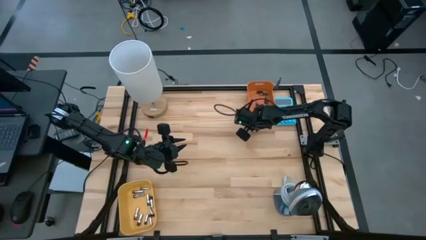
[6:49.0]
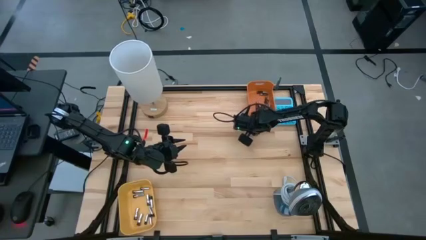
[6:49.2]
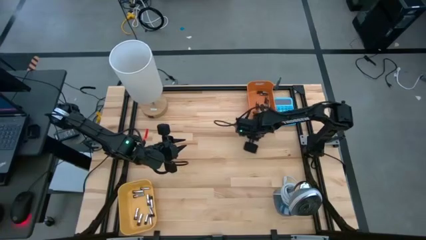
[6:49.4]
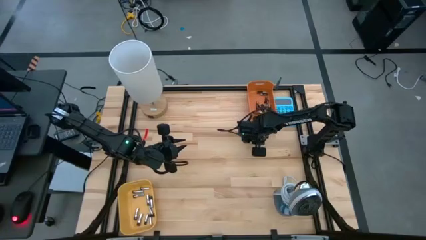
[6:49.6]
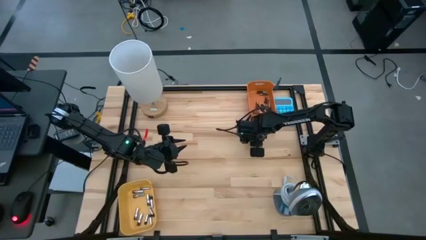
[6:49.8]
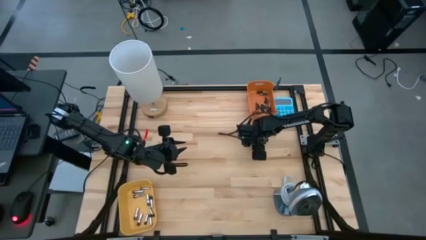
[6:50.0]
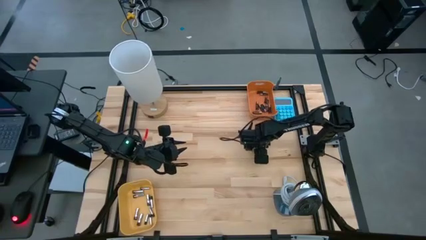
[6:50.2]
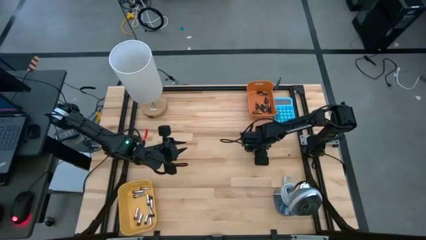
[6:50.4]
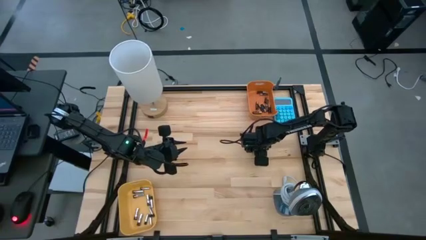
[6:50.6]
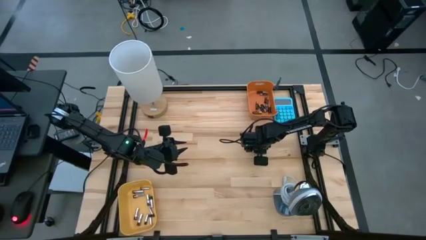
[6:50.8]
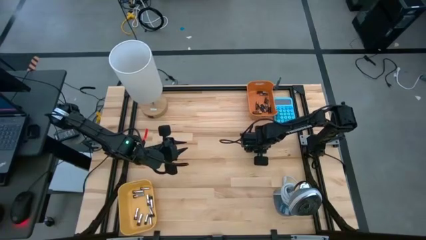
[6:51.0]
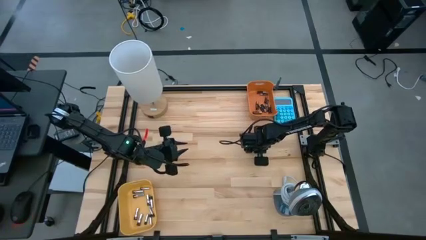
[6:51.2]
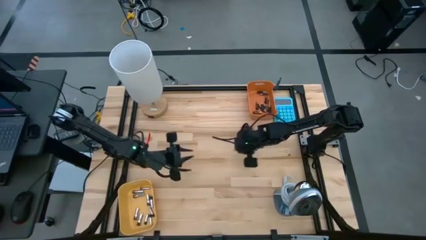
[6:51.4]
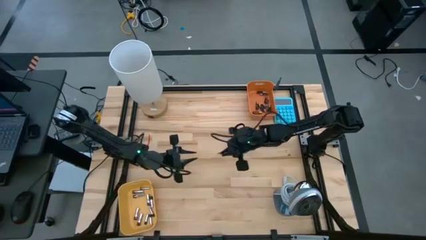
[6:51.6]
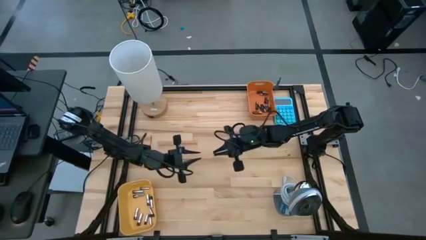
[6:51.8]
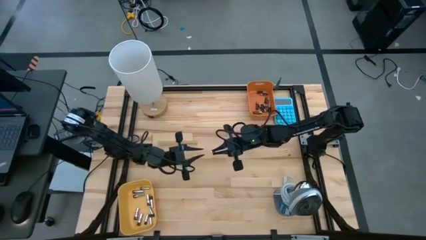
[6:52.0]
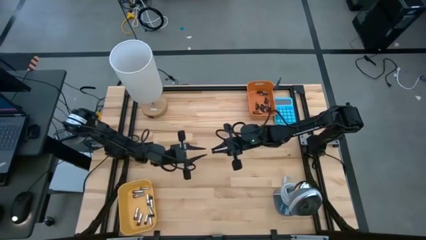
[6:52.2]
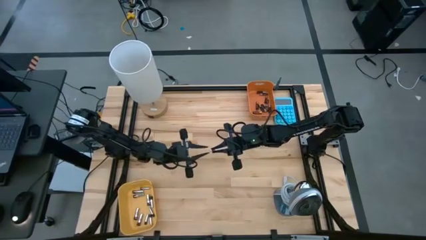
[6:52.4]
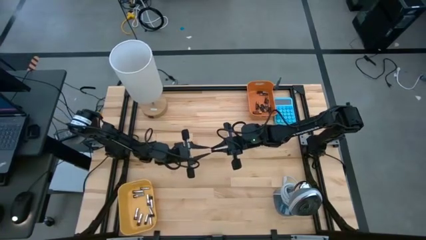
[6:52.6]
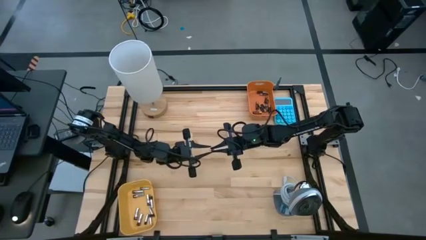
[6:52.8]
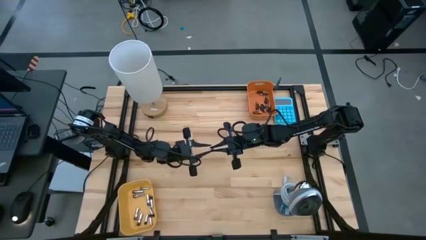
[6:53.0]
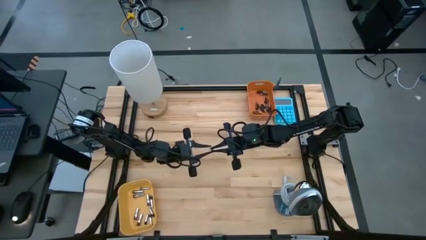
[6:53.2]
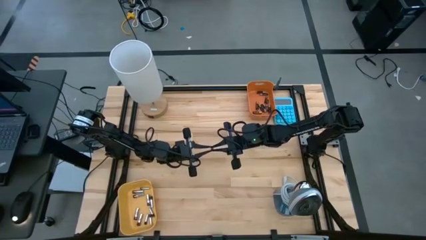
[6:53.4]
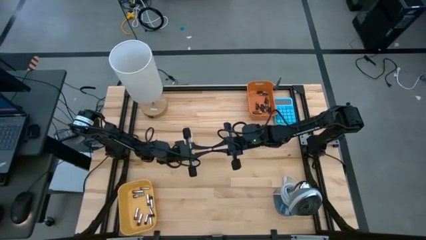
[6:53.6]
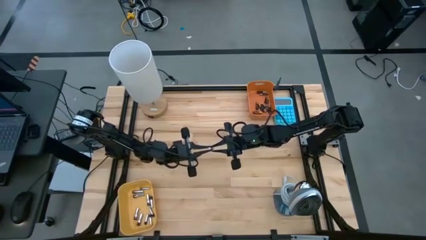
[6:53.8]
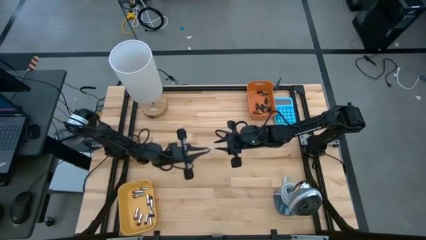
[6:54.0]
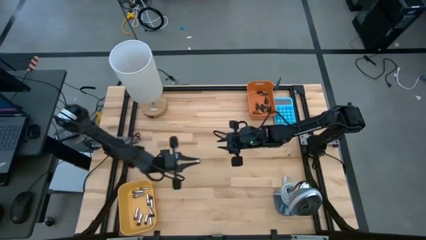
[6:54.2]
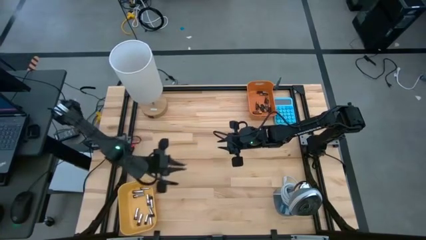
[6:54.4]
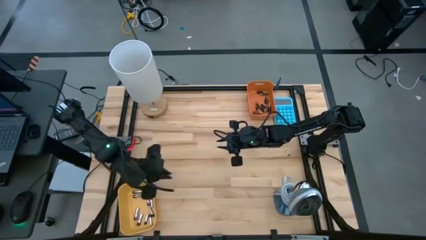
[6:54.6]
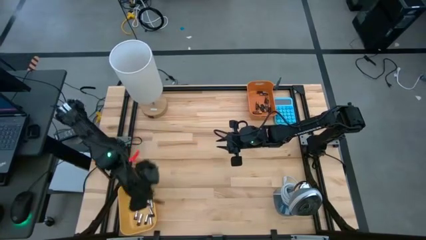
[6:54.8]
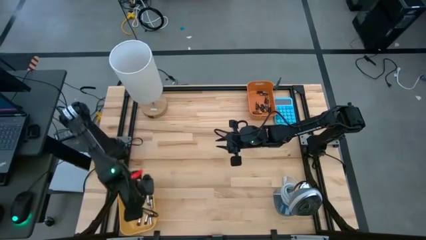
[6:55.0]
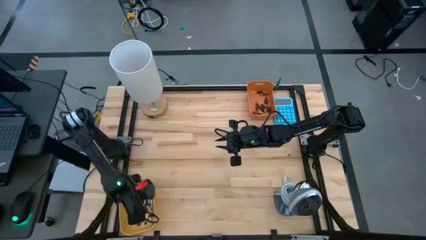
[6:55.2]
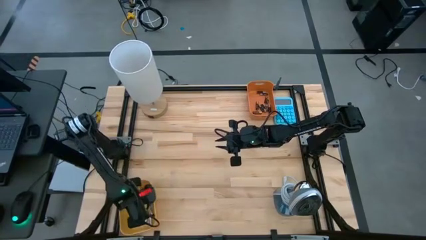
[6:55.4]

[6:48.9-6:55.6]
Task: Sort batteries
Put the silver battery into the yellow bin

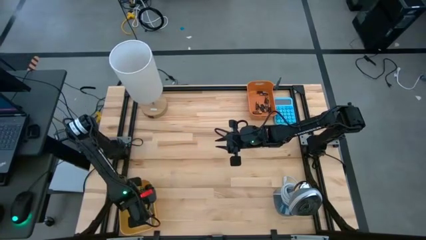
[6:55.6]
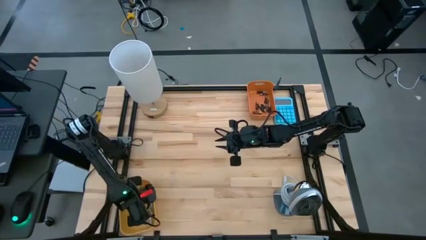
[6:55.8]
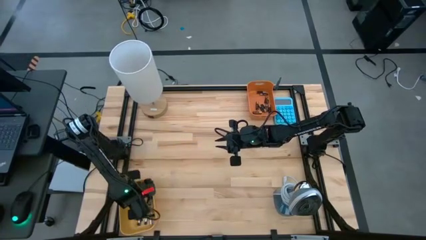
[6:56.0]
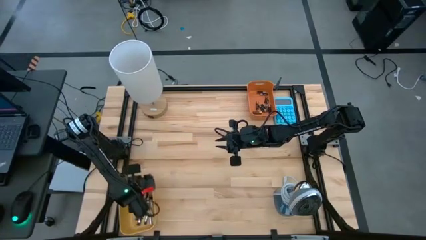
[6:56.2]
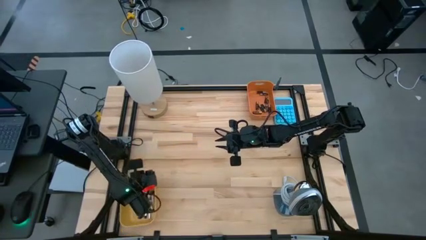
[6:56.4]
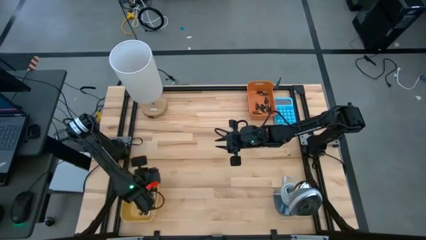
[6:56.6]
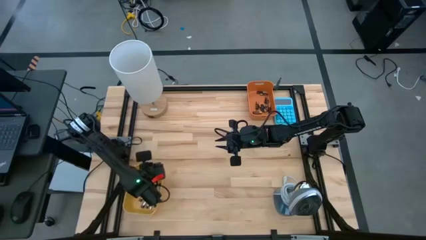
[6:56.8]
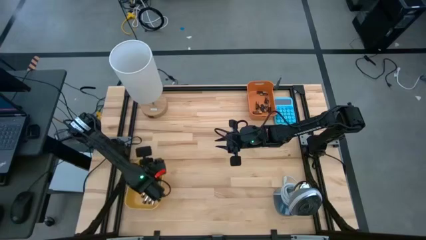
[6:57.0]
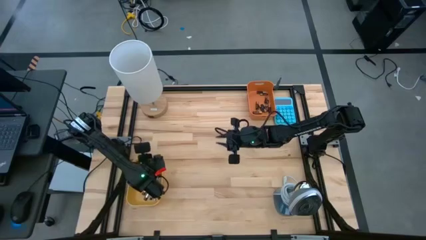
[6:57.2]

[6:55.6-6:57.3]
Move the yellow bin to the bottom left of the table

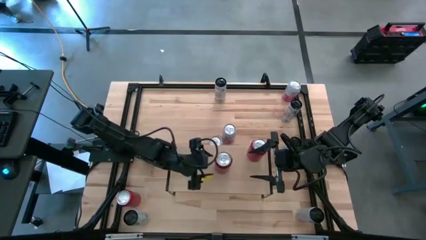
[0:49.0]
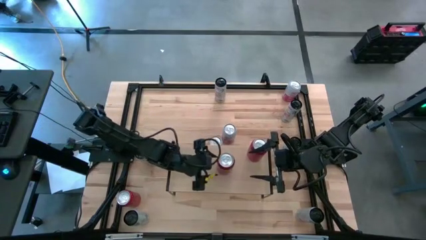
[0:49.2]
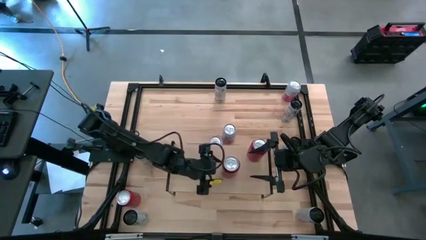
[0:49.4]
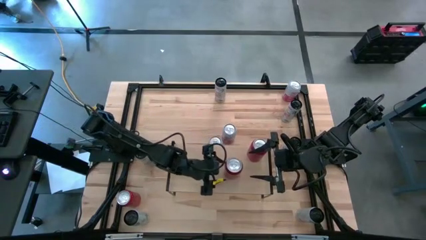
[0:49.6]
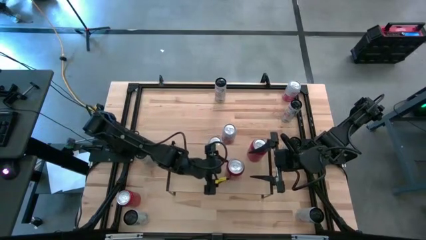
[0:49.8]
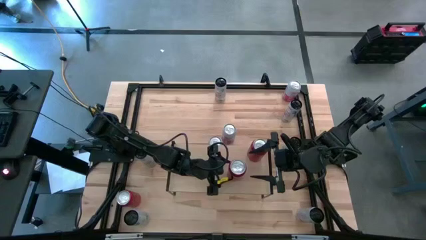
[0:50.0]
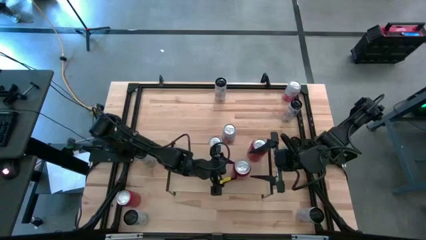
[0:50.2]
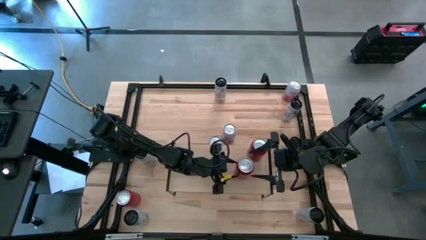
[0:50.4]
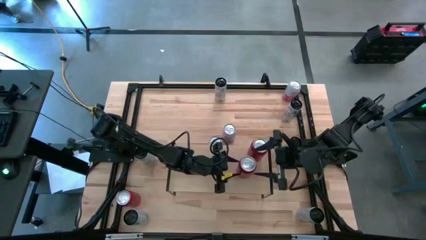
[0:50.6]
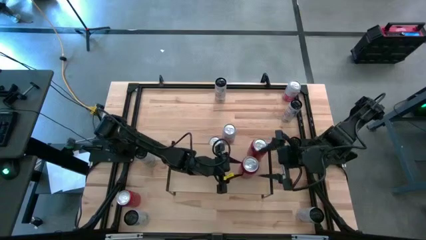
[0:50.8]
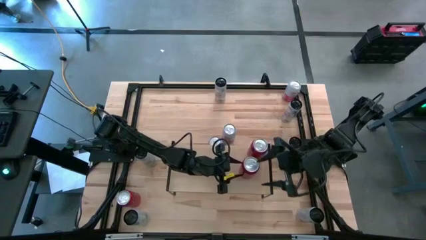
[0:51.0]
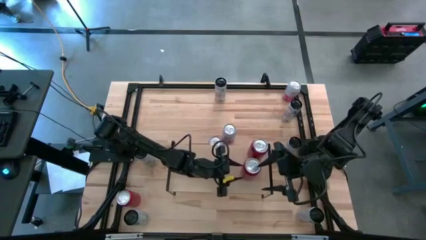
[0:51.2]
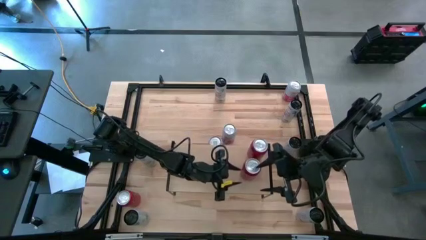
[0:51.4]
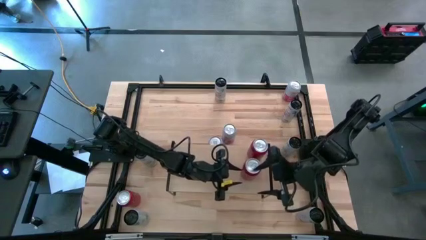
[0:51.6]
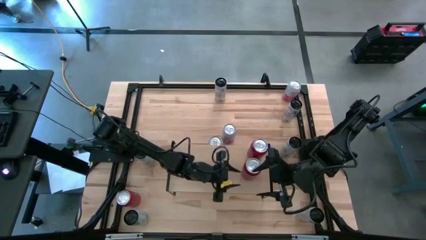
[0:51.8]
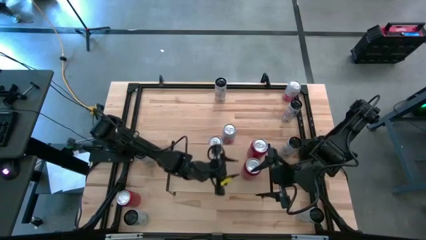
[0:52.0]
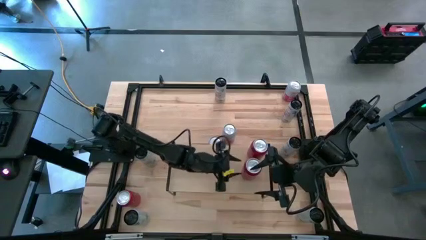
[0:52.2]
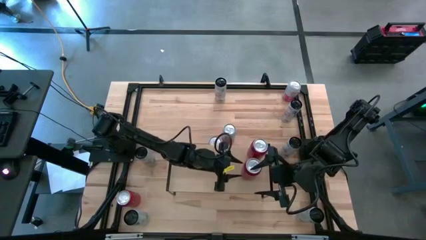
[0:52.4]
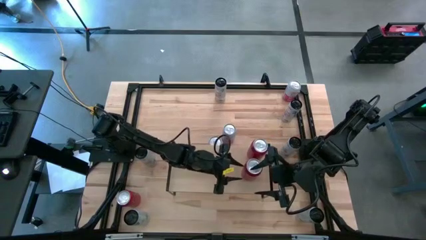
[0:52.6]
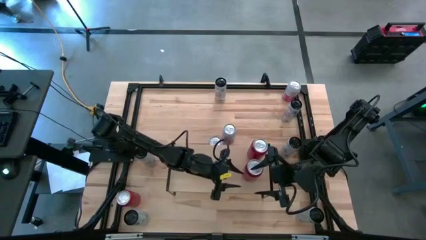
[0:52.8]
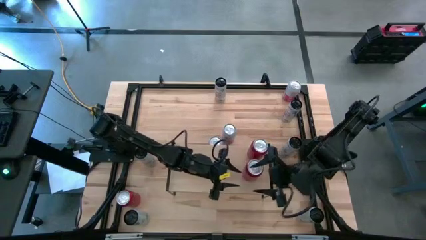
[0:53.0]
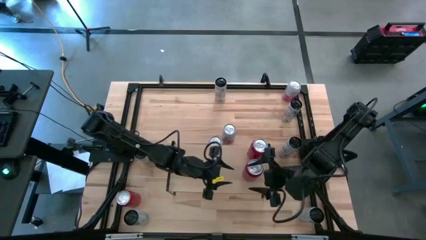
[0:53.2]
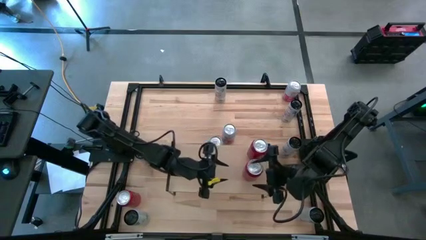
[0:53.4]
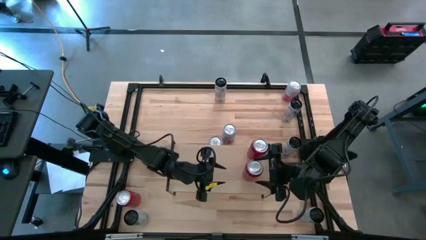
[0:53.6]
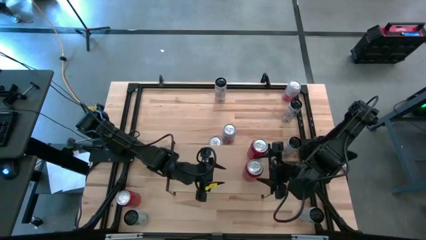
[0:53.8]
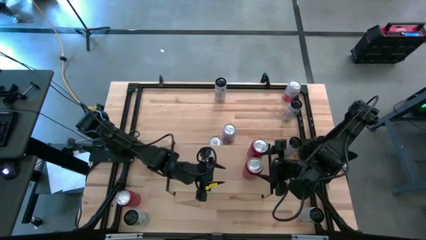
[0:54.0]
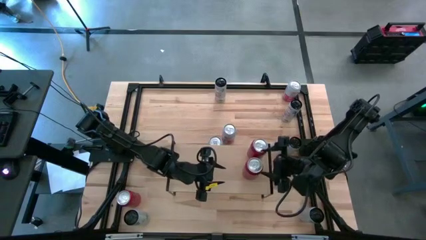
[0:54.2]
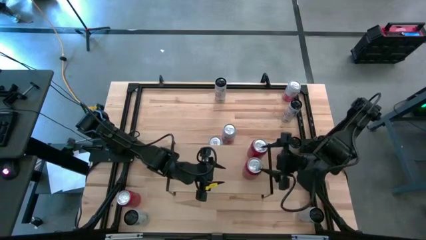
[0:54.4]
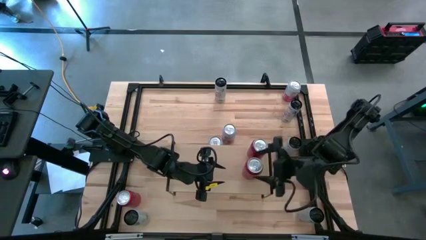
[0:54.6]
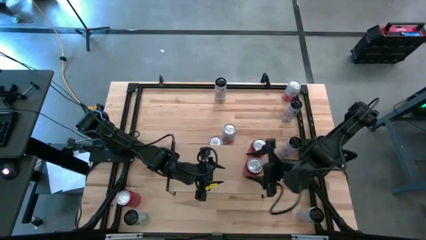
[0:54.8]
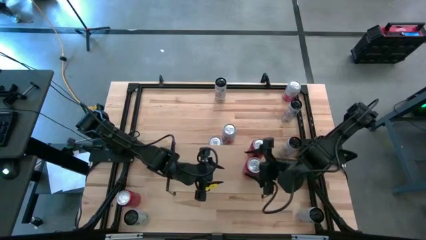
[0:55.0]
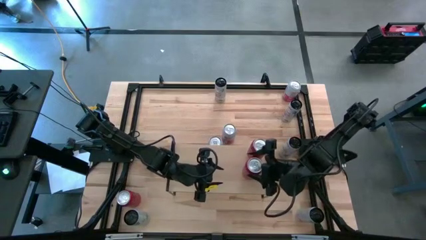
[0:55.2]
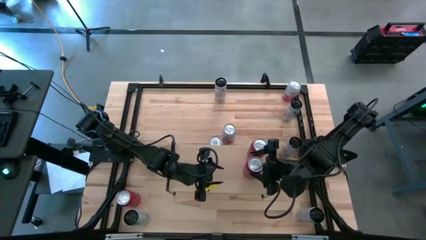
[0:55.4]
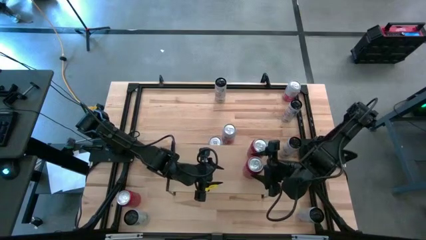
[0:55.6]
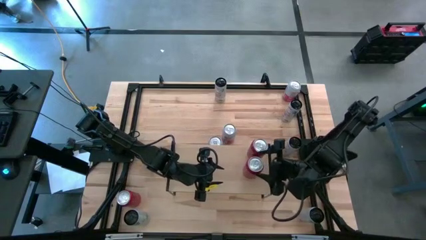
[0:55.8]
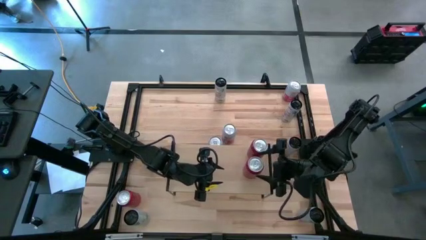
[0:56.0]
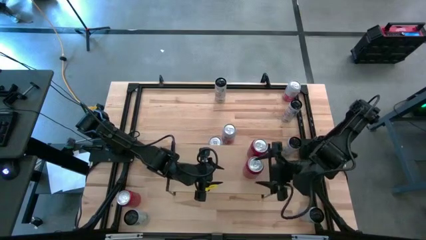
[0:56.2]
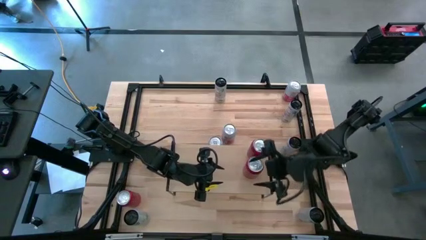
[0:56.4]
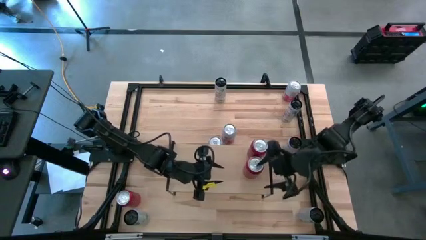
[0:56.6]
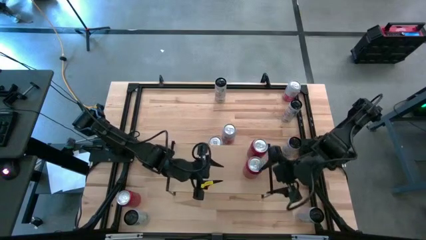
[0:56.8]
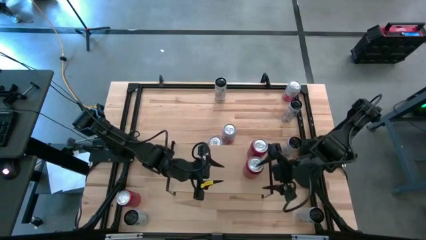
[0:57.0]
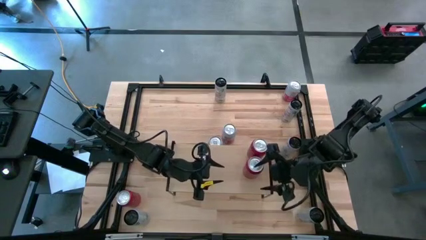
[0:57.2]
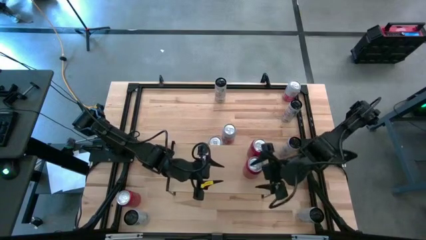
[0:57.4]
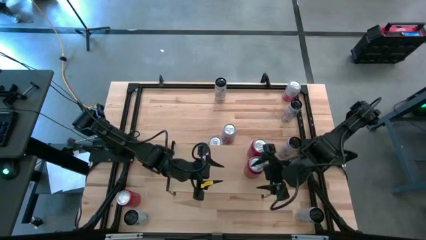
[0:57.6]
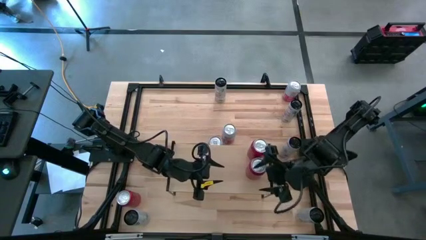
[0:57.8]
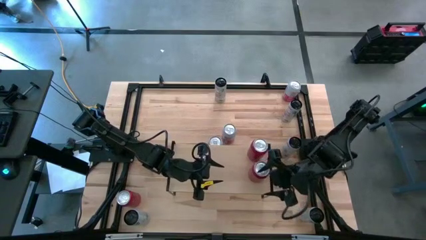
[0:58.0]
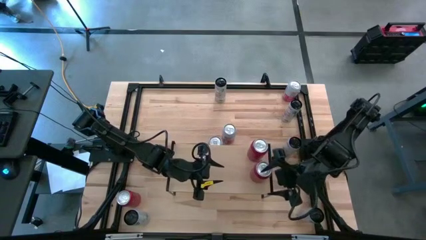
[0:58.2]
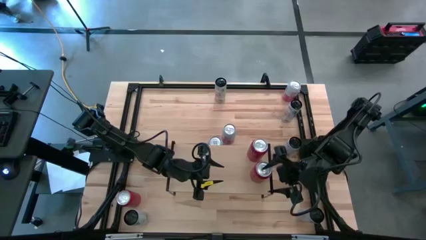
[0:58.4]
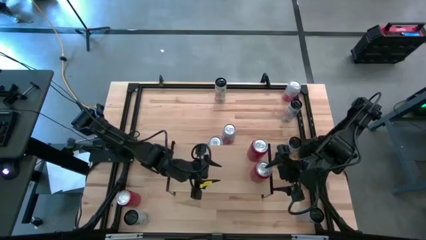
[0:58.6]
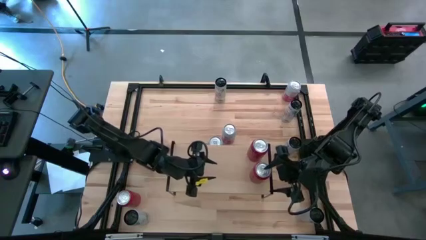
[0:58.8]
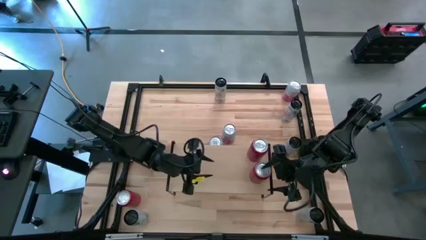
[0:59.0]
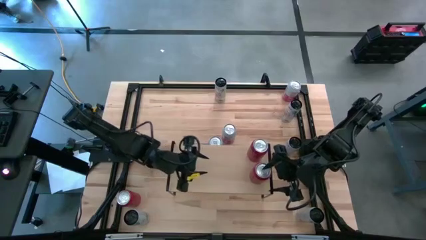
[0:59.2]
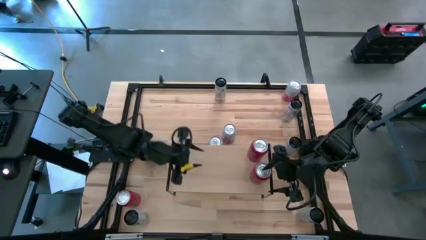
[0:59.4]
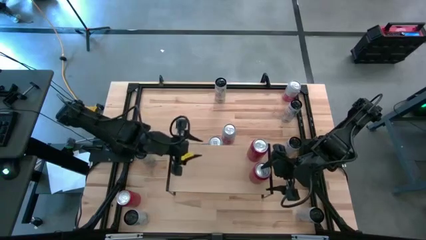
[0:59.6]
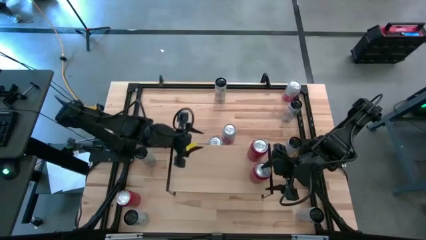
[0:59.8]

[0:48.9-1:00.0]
Task: Place canned beverage on shelf
Put the top red-black soda can on the shelf aligned with the other red-black soda cans
